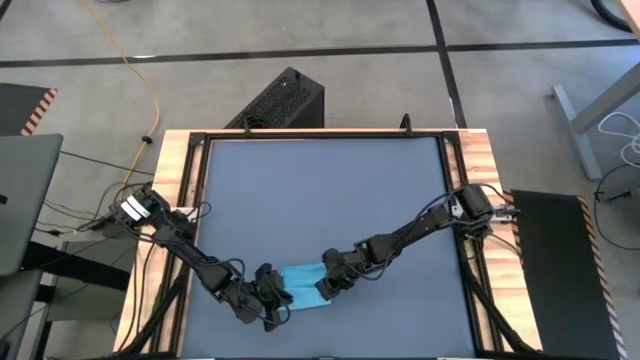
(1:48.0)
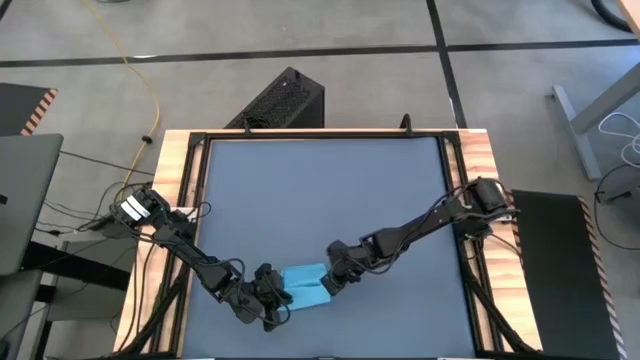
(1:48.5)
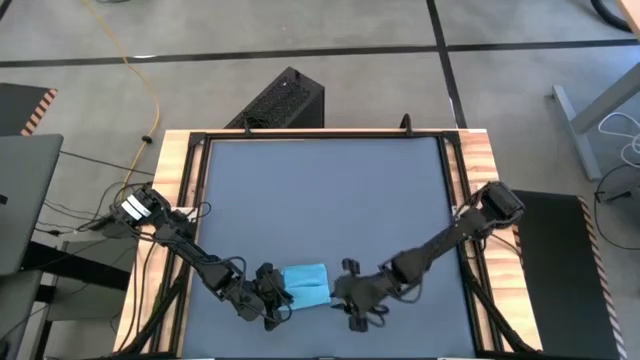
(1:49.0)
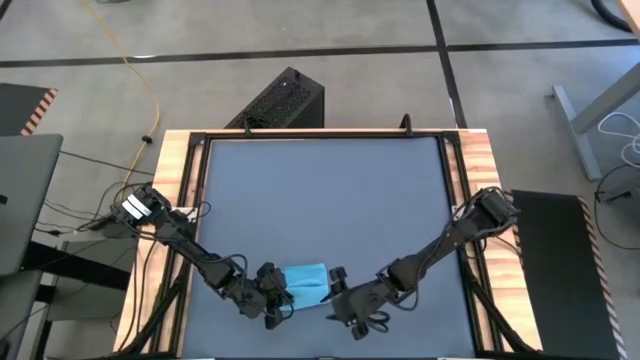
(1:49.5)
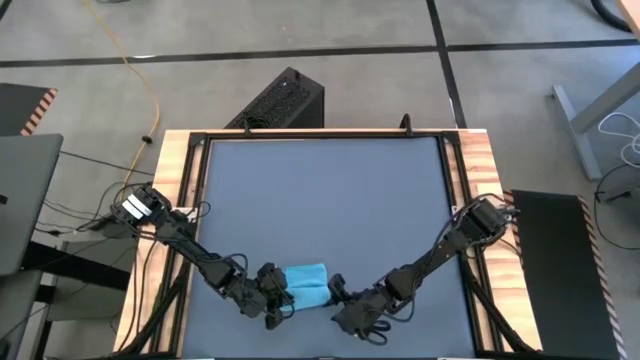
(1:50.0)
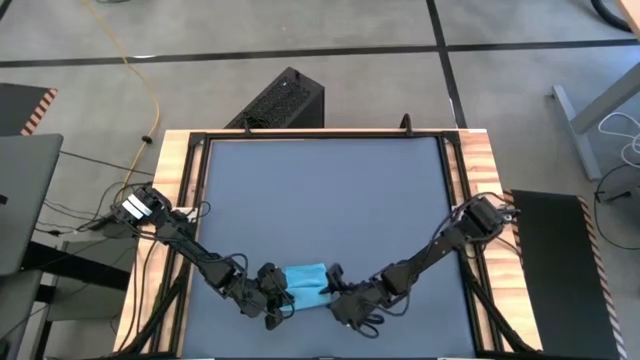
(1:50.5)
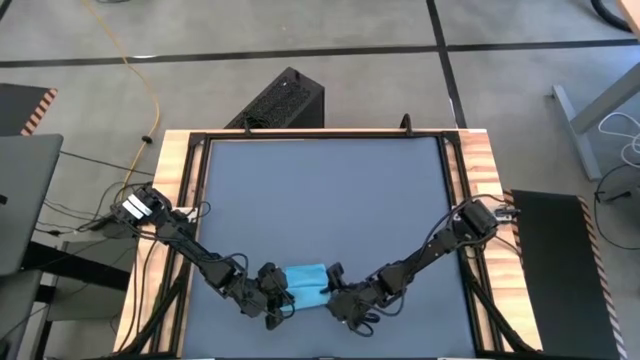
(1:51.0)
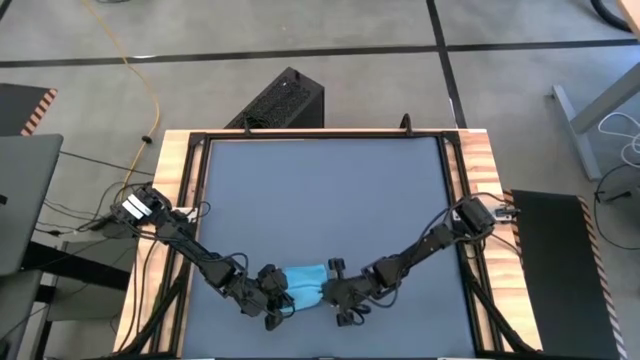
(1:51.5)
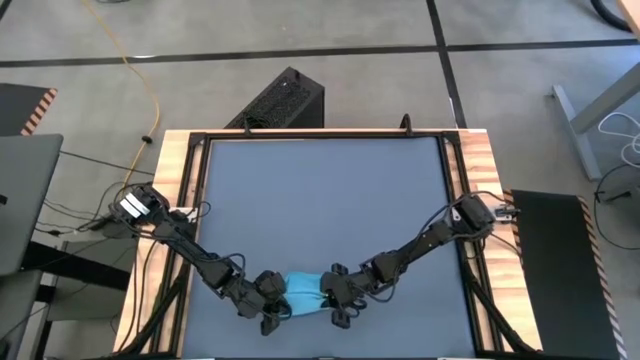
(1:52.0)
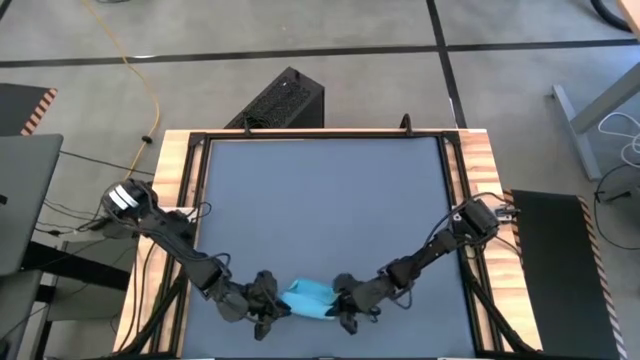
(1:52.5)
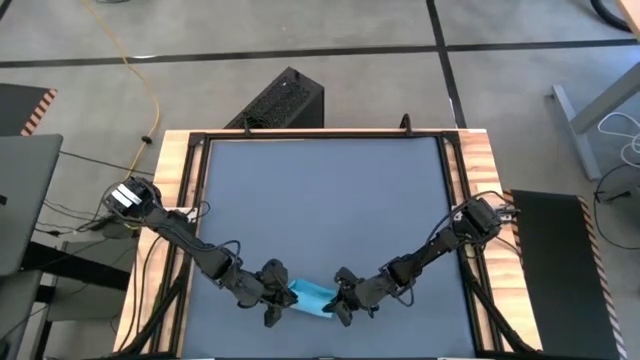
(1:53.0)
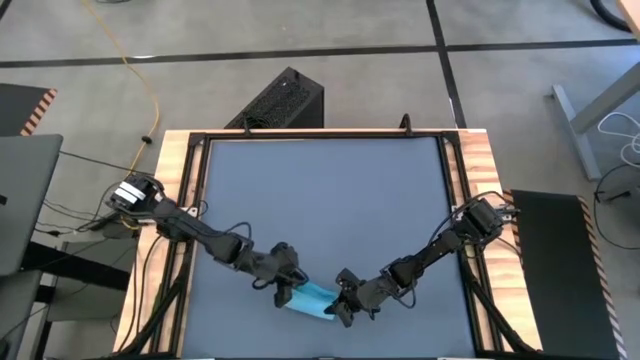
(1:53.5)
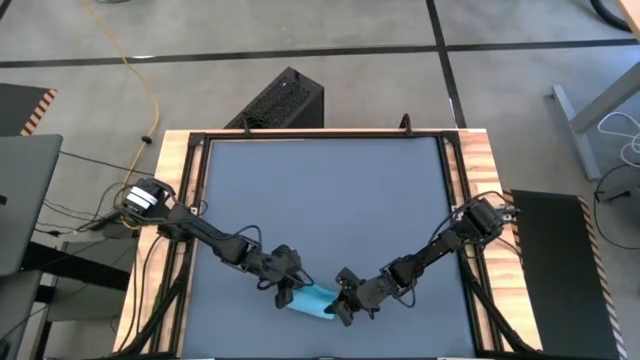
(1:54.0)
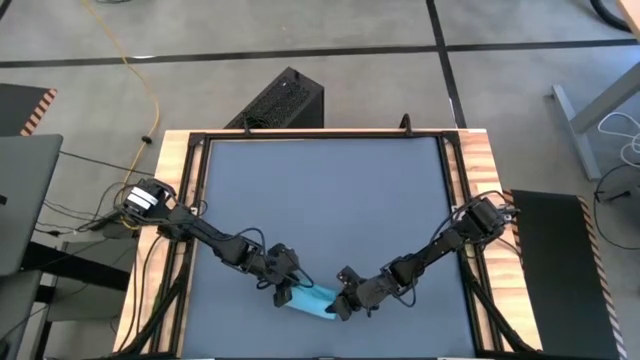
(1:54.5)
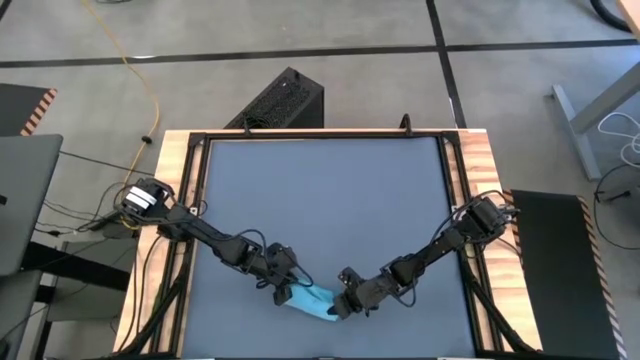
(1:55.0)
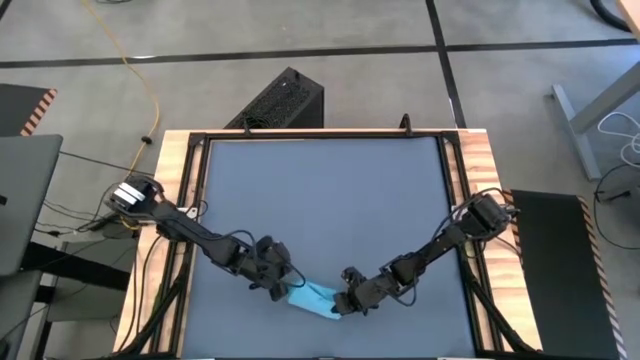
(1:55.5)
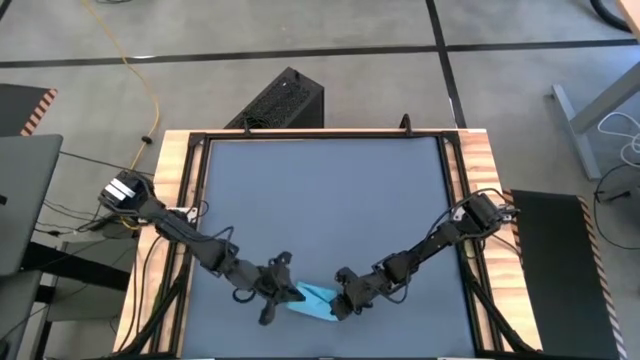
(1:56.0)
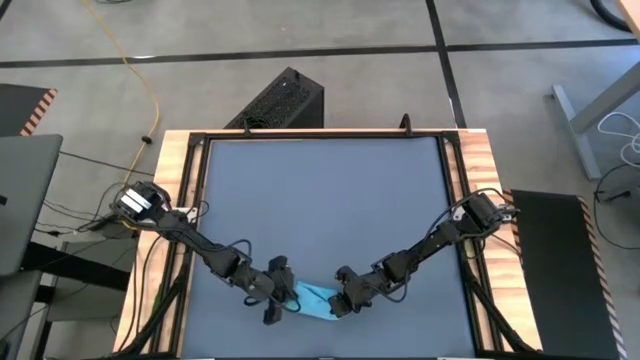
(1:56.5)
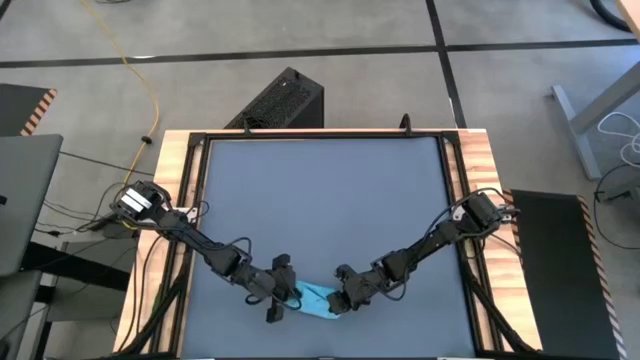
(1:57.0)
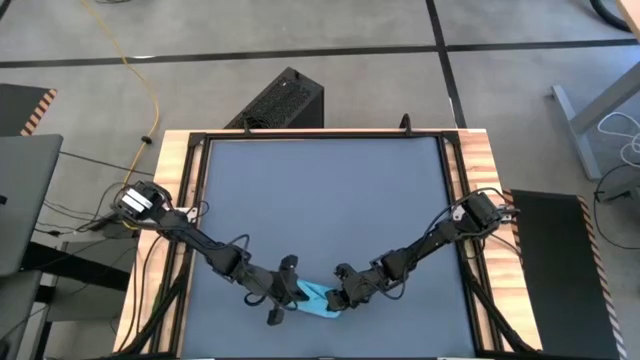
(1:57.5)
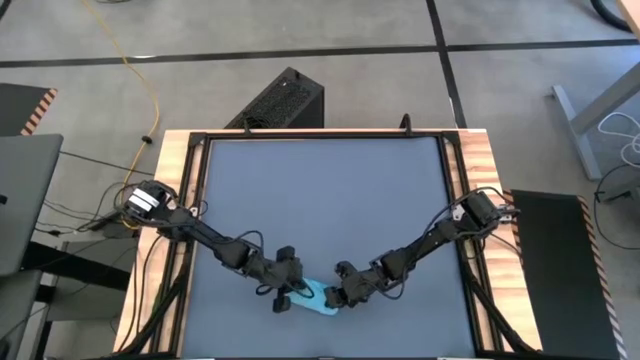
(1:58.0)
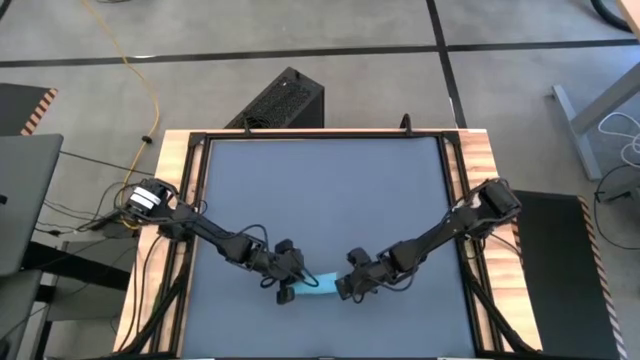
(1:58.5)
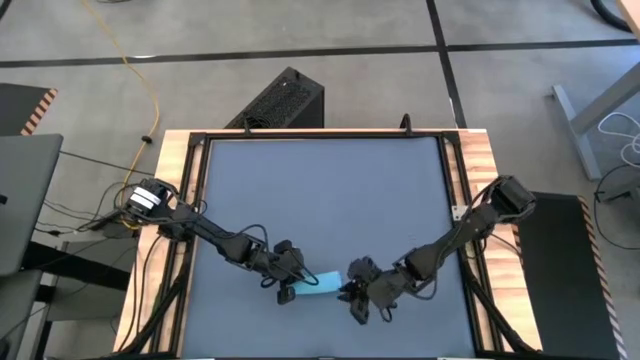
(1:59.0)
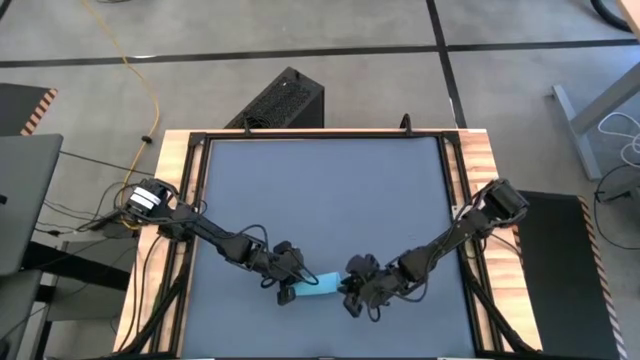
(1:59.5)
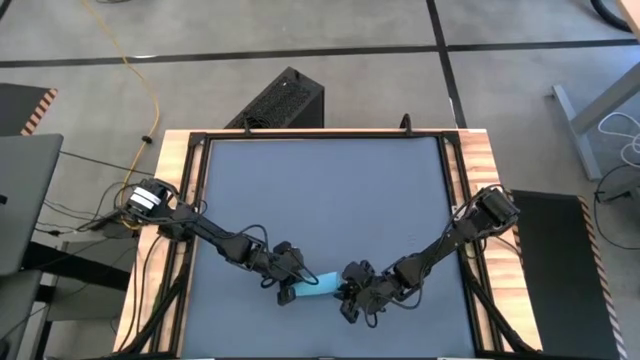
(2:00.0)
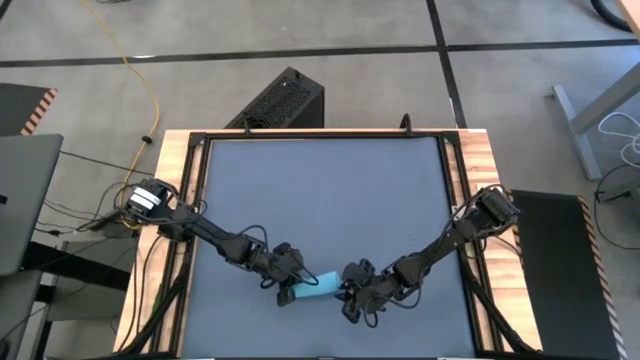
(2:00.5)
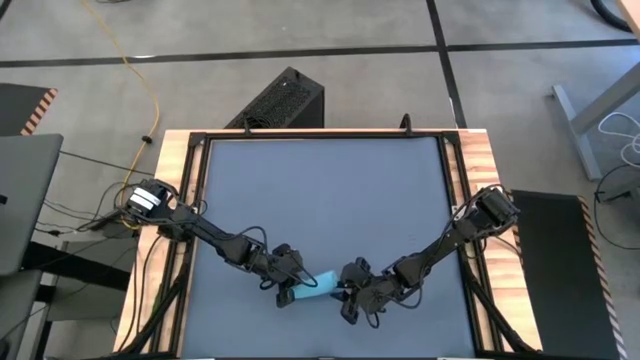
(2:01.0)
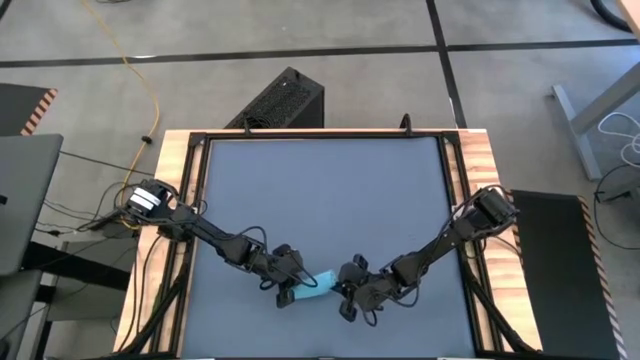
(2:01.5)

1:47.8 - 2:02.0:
Task: Roll towel
Roll the blue towel

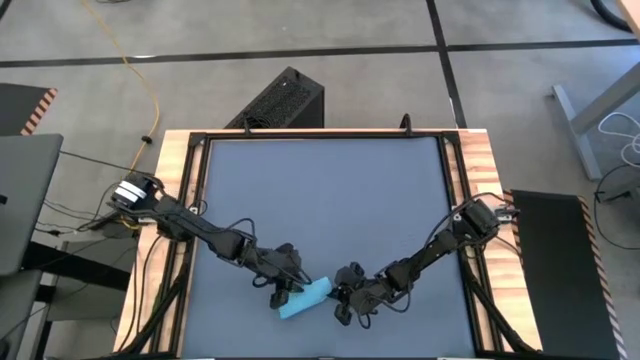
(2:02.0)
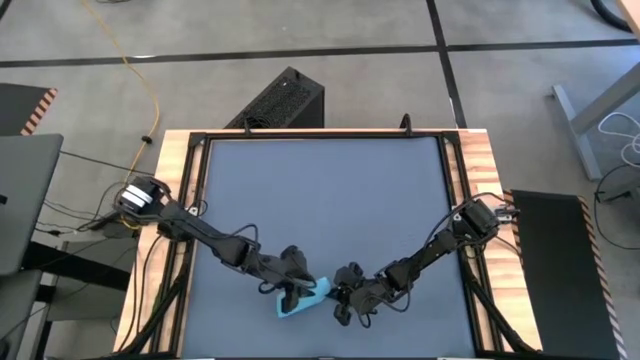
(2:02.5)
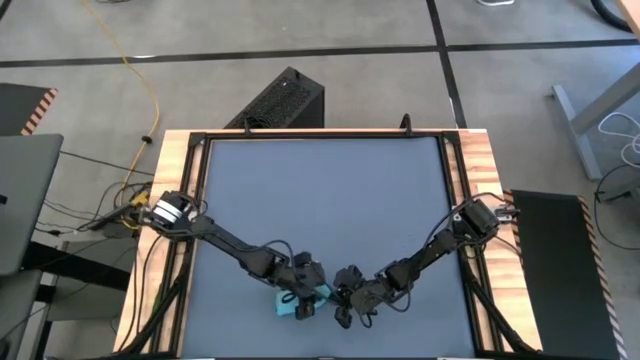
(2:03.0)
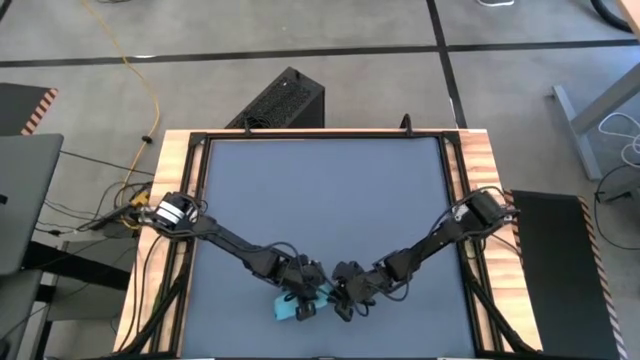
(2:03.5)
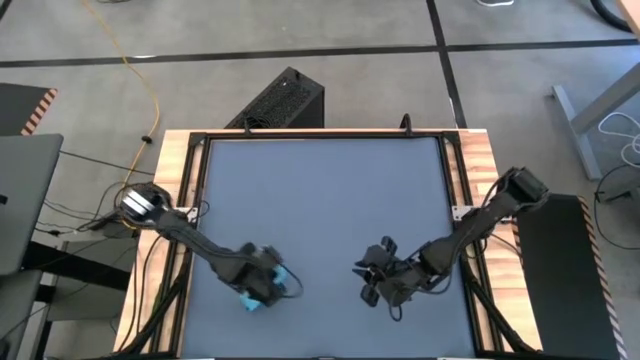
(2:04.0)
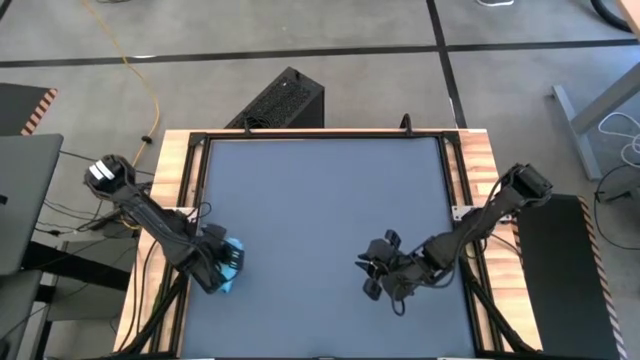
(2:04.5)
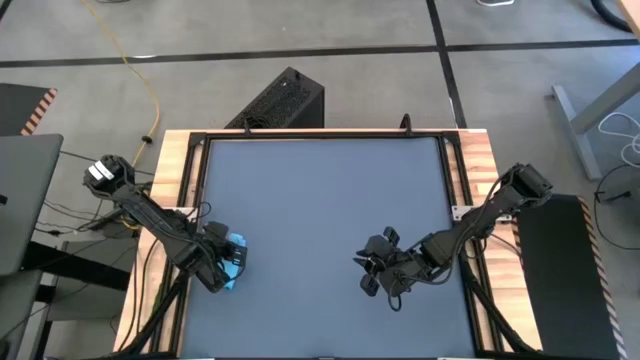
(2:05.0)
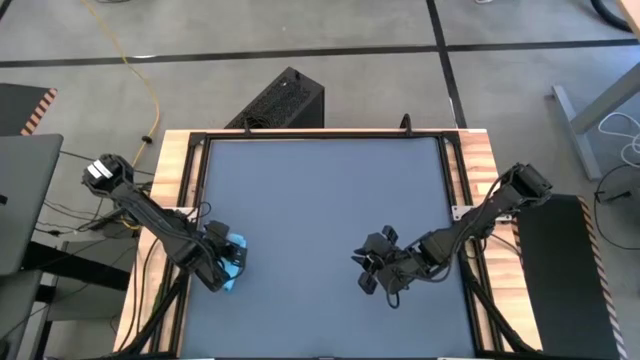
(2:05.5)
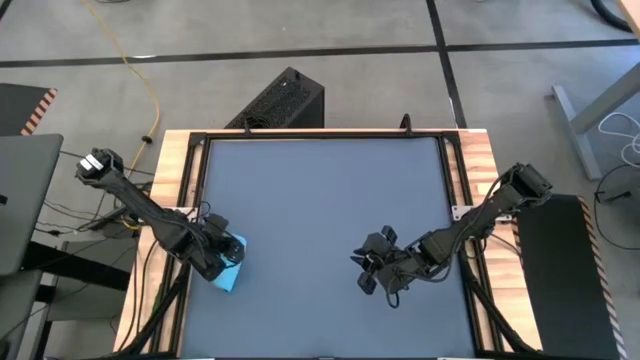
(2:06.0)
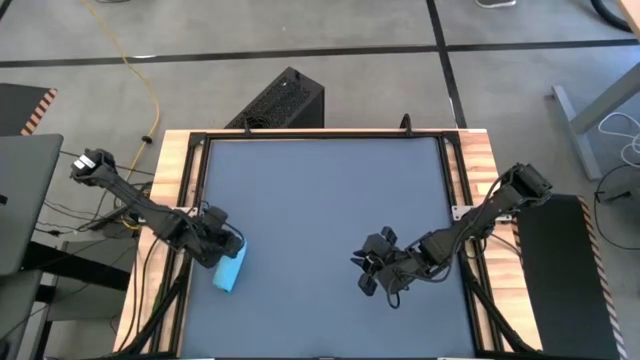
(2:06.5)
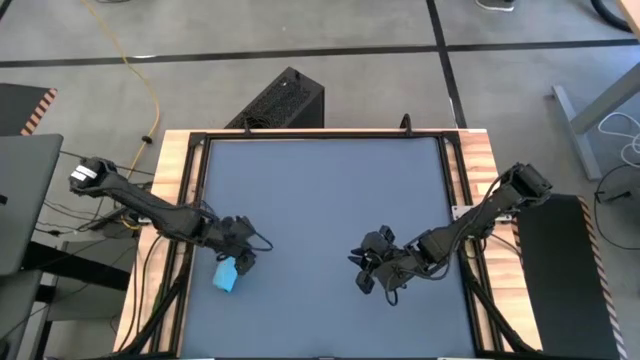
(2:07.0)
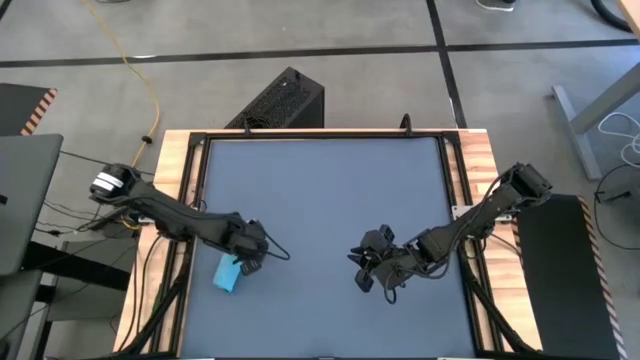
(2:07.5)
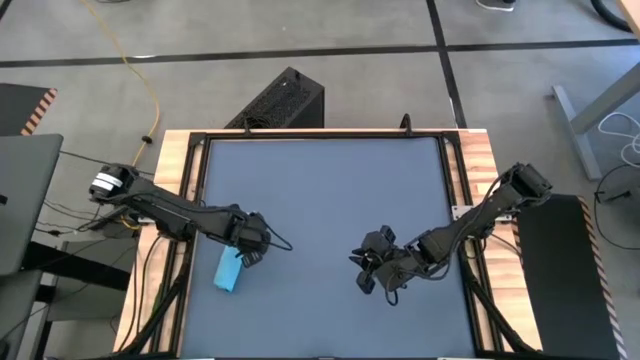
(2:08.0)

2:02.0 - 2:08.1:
Move the blue towel to the left of the table

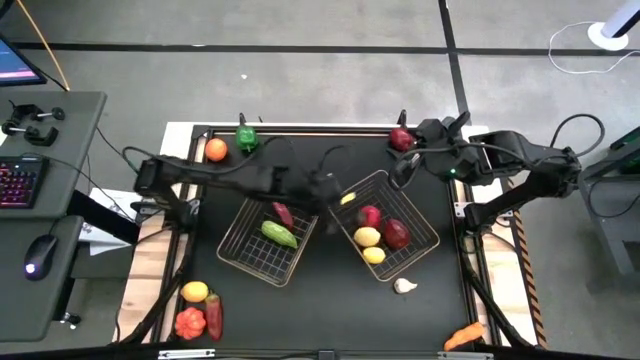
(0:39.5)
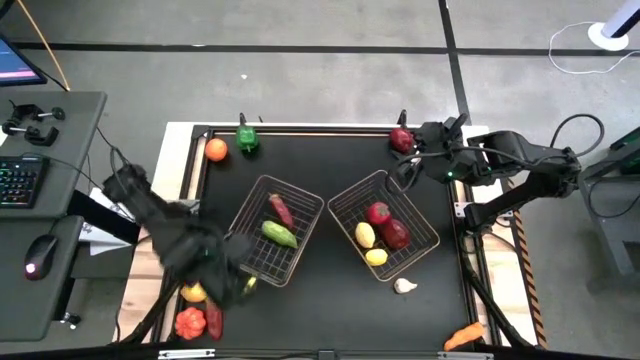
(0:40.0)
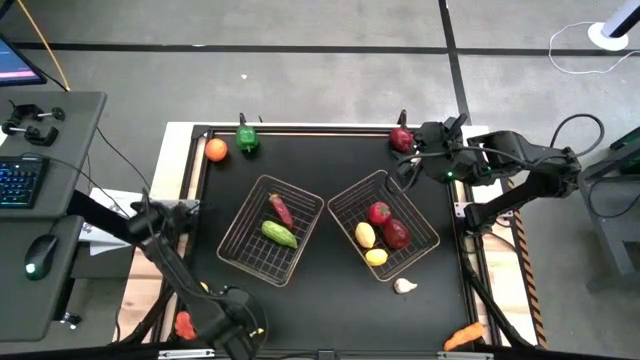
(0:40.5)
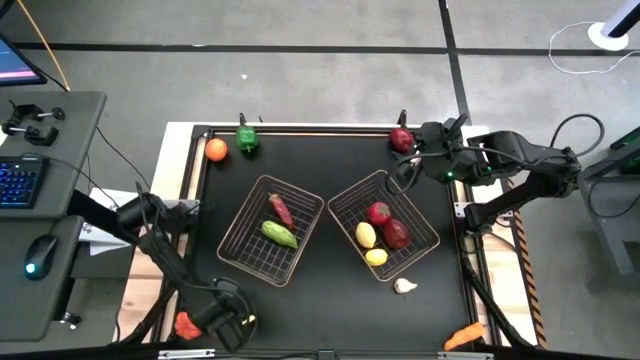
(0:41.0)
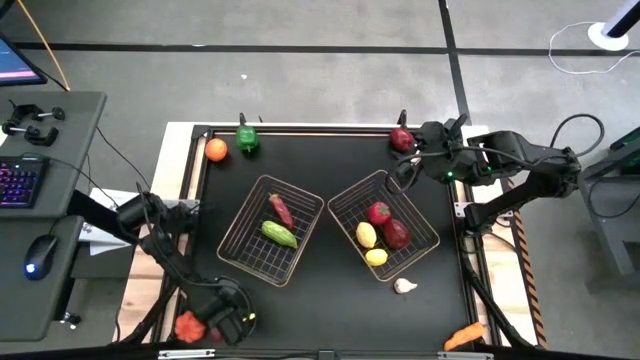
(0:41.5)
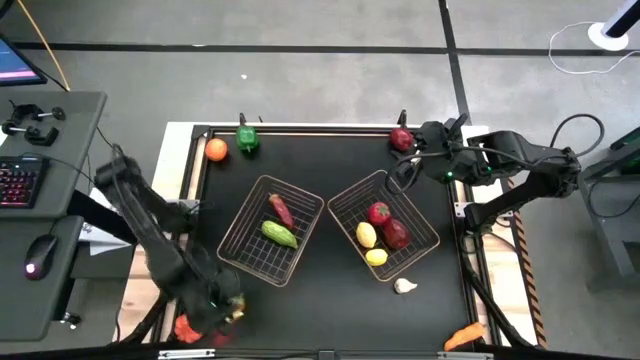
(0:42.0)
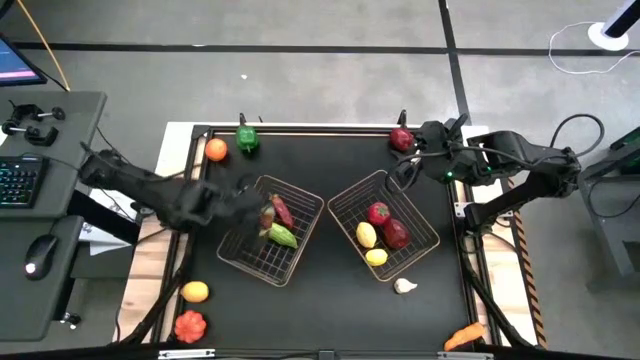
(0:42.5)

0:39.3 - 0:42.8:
Task: Sort produce into baskets
Put the red chili pepper into the left basket
